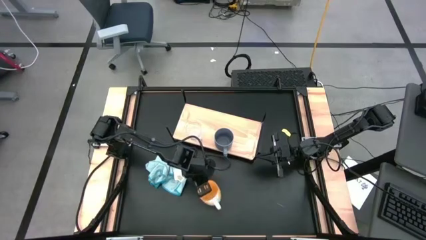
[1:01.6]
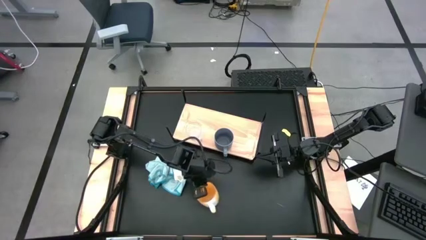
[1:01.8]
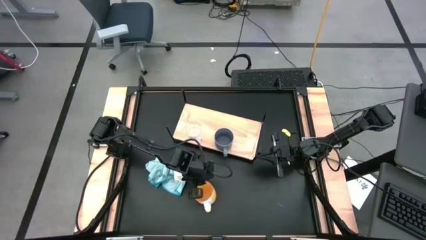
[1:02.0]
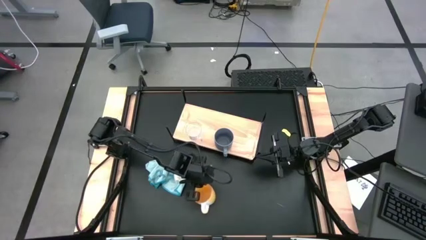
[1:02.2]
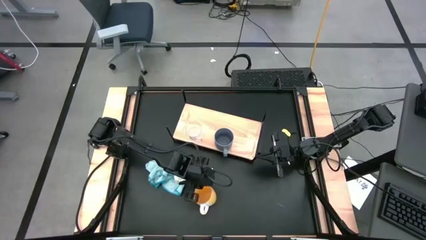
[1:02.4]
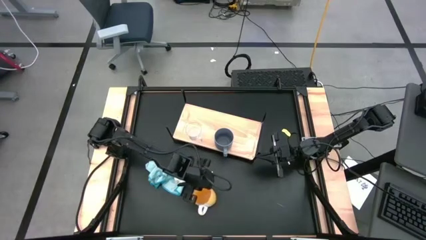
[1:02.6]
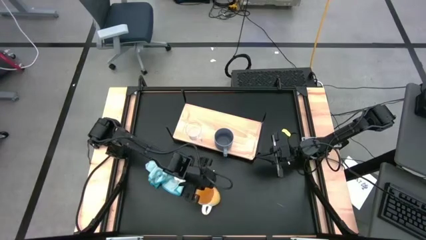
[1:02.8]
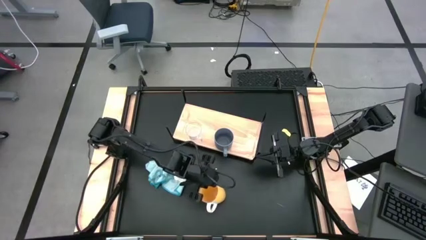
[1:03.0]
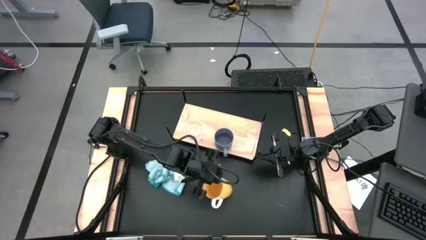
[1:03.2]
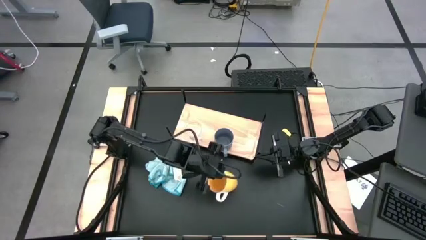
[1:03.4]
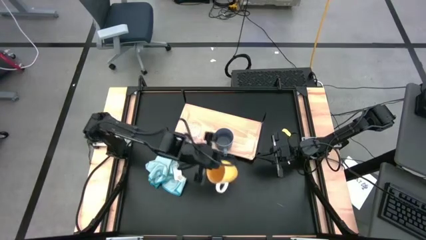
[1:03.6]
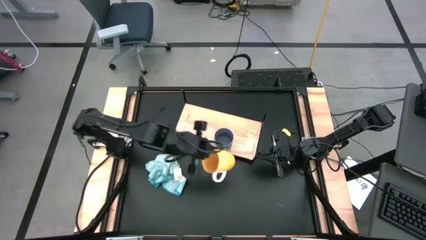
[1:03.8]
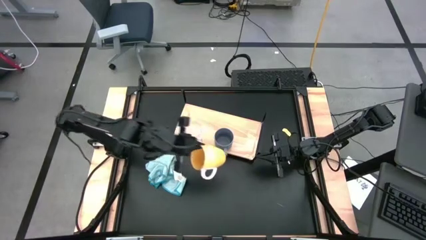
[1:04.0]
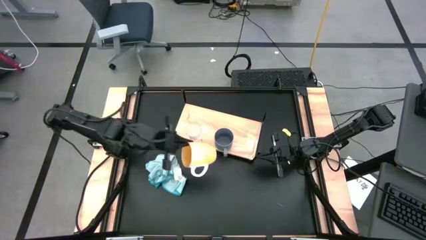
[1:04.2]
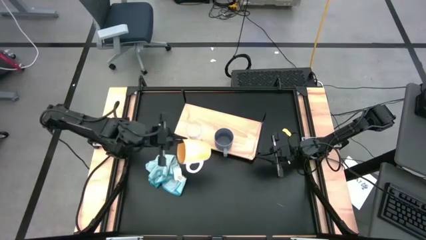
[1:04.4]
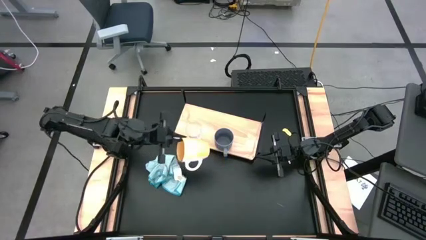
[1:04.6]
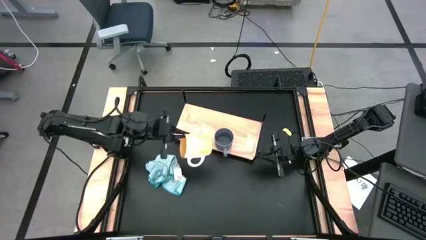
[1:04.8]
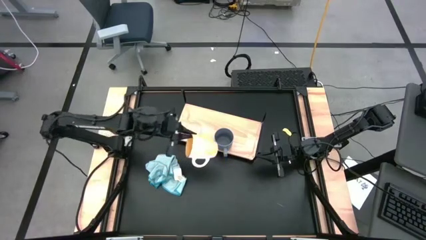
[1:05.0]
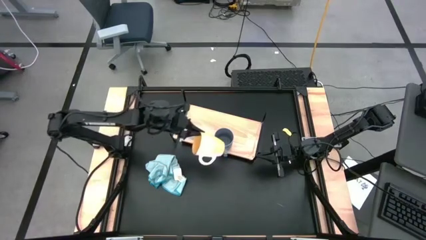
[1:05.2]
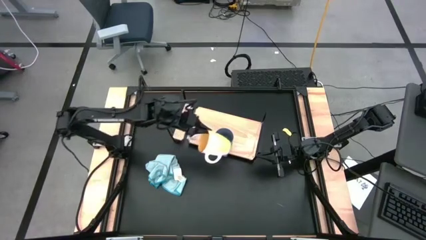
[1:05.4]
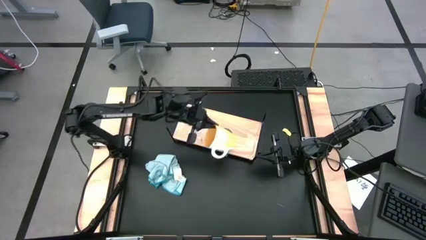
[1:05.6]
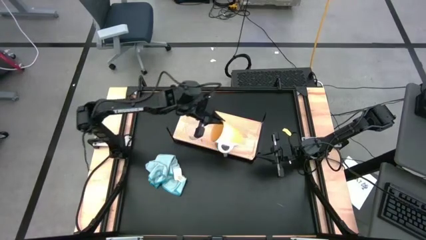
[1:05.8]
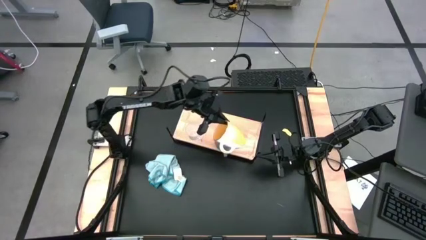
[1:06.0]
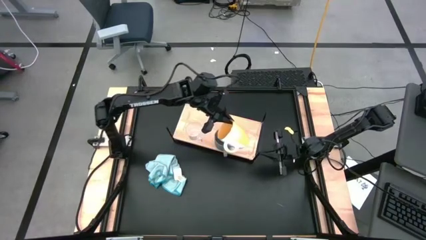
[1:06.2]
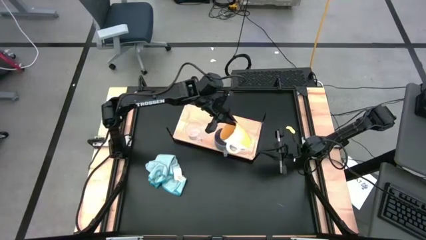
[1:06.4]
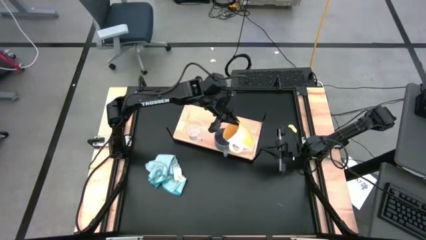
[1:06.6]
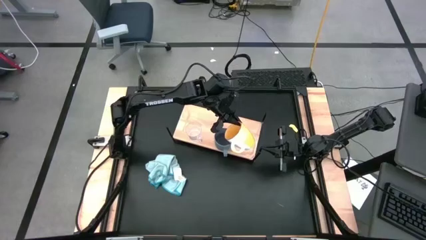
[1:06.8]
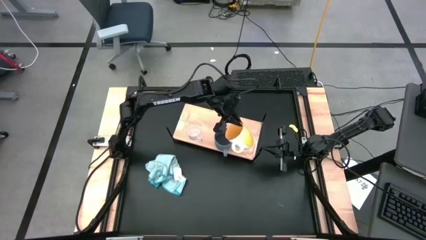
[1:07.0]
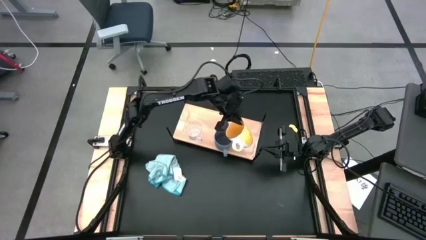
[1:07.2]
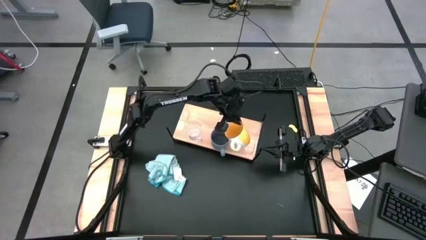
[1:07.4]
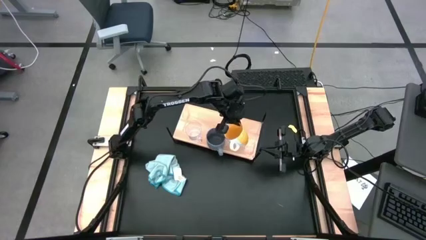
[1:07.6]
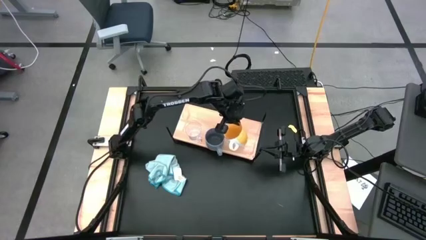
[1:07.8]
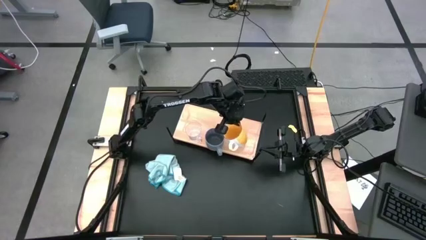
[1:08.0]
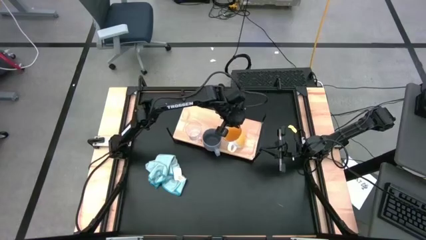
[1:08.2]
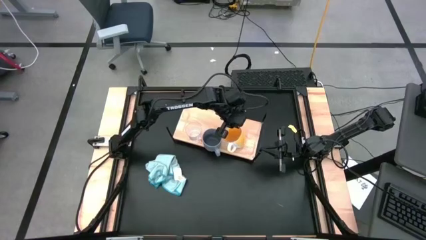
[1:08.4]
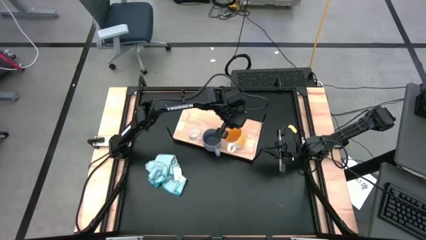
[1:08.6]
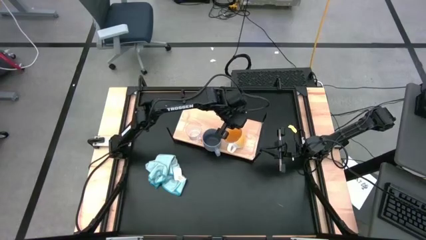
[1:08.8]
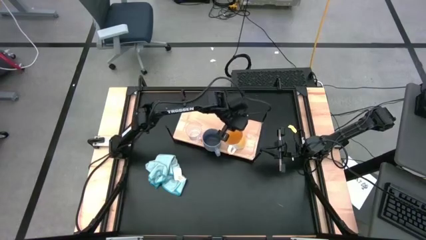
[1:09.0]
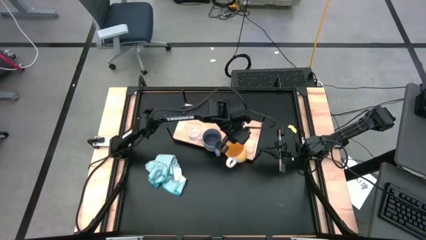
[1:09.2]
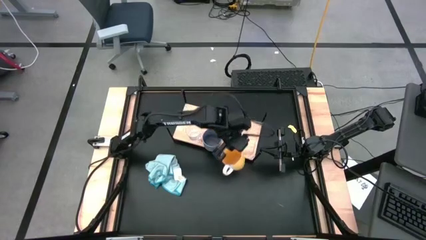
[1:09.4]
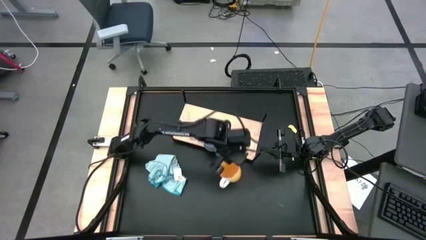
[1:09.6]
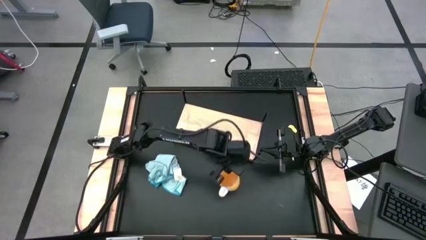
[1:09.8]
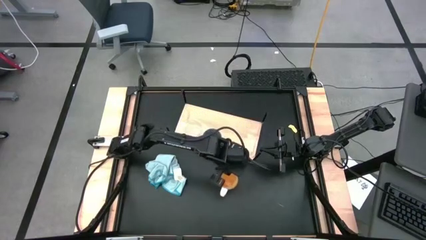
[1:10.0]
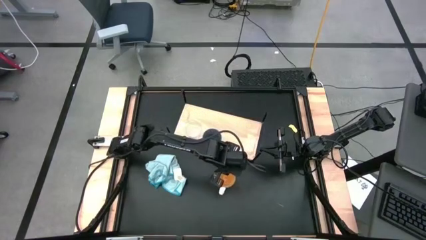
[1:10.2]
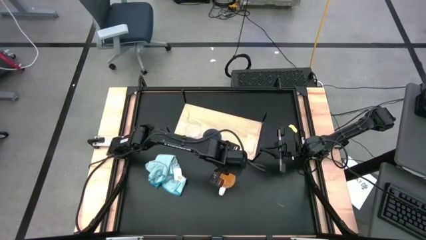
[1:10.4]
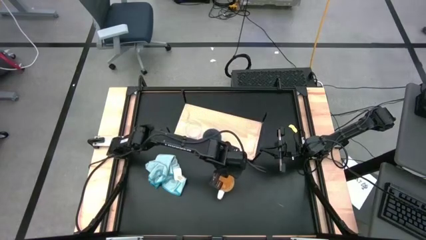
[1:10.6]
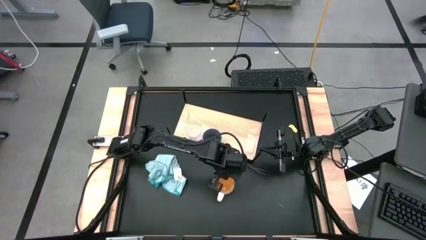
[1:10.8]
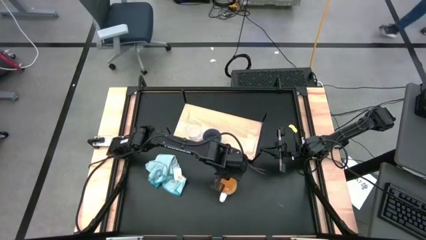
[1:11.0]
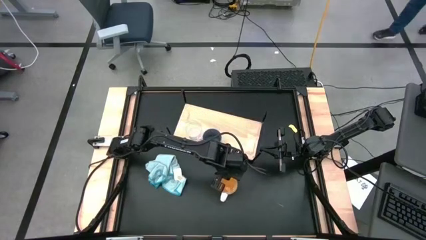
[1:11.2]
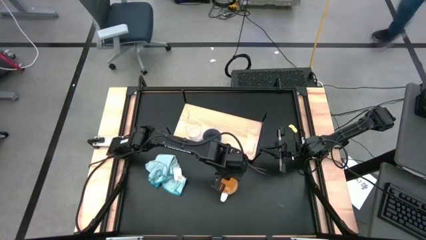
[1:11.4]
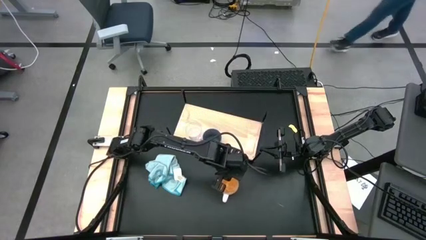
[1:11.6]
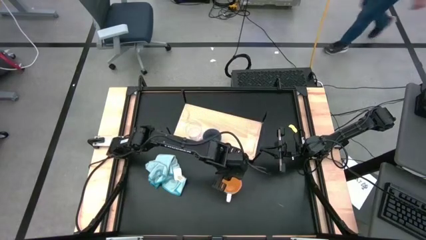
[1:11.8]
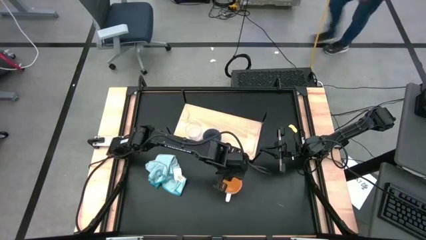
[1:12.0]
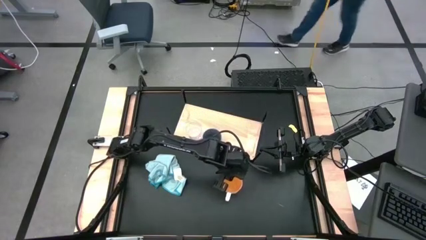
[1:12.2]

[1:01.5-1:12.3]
Task: Stack small to large cups/mugs on shelf
Put the yellow mug on the shelf

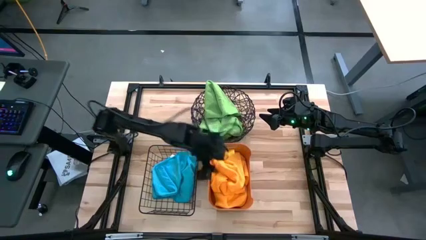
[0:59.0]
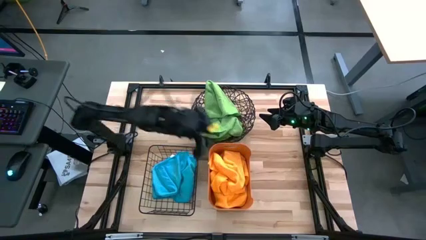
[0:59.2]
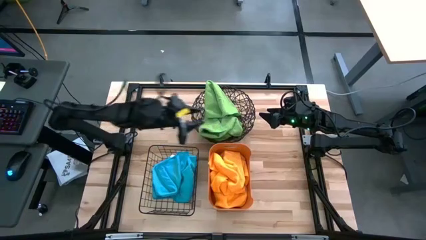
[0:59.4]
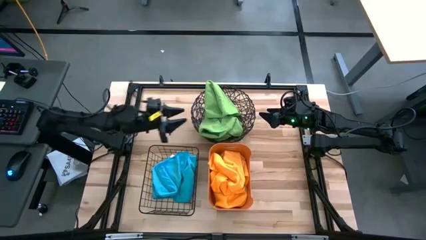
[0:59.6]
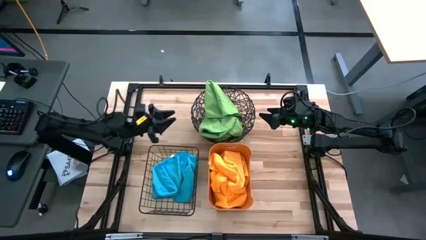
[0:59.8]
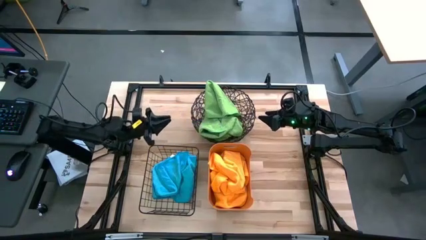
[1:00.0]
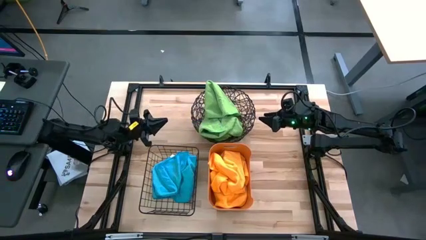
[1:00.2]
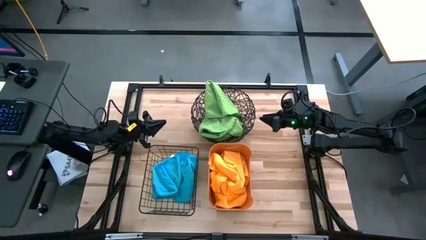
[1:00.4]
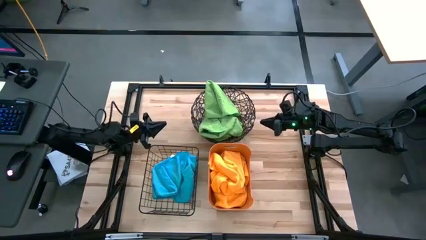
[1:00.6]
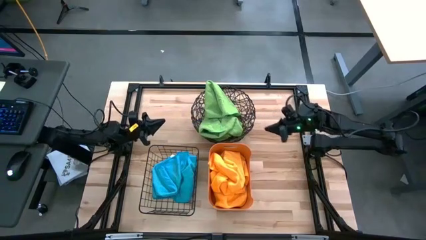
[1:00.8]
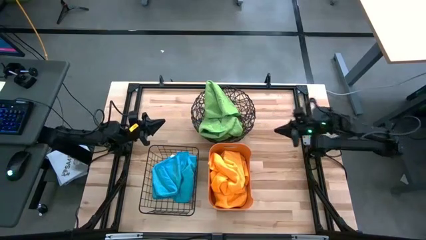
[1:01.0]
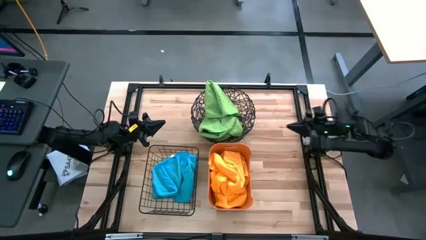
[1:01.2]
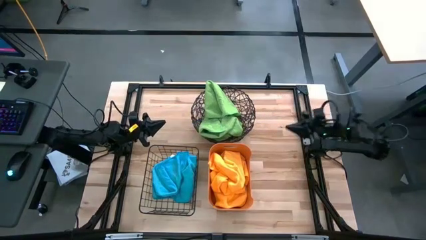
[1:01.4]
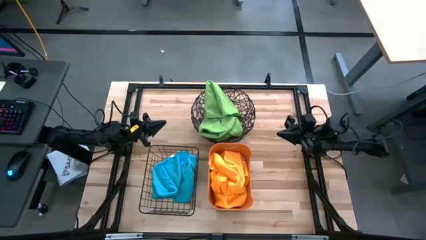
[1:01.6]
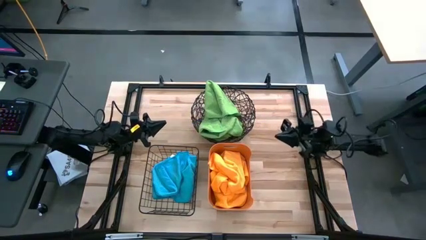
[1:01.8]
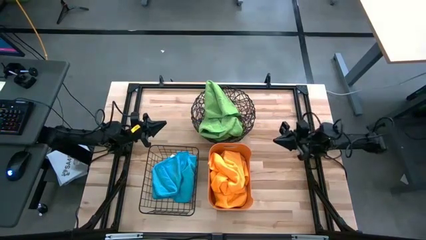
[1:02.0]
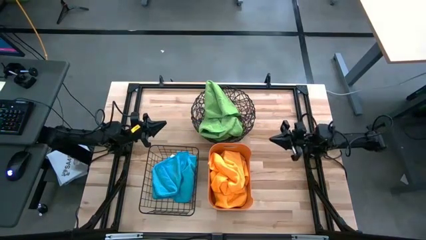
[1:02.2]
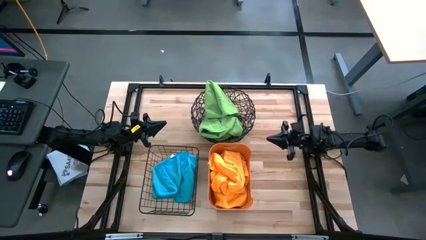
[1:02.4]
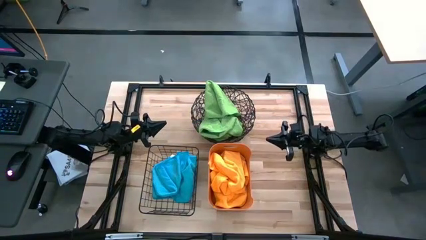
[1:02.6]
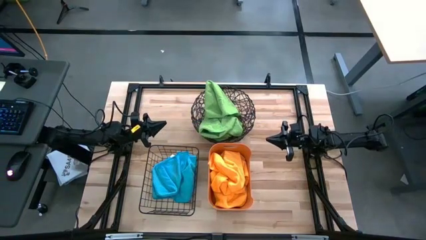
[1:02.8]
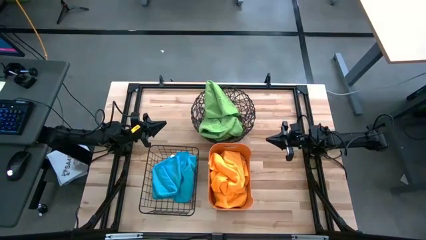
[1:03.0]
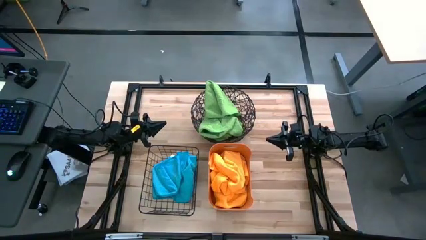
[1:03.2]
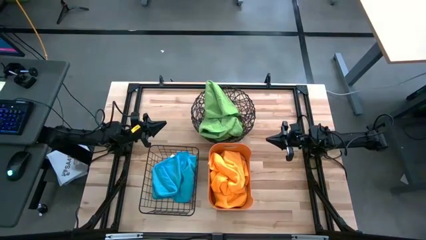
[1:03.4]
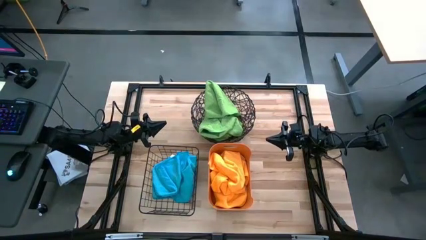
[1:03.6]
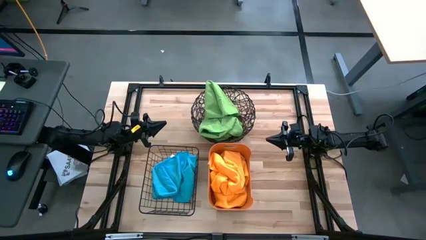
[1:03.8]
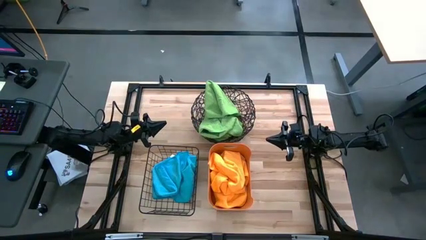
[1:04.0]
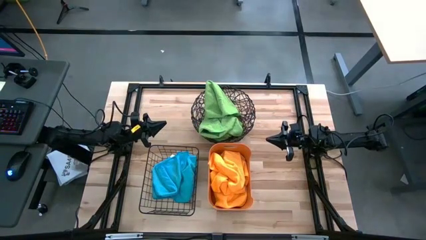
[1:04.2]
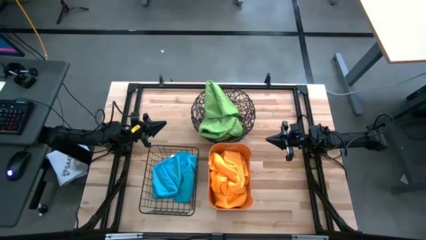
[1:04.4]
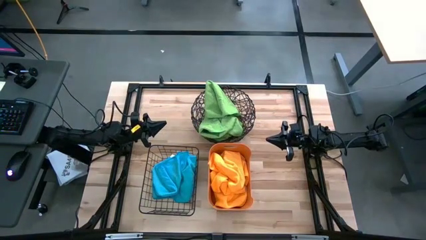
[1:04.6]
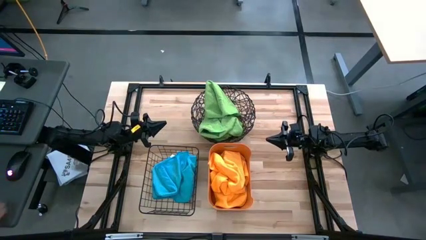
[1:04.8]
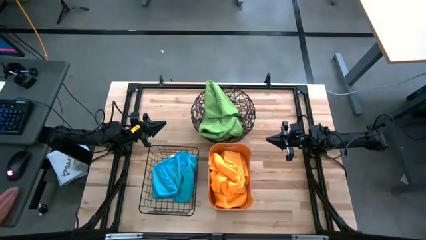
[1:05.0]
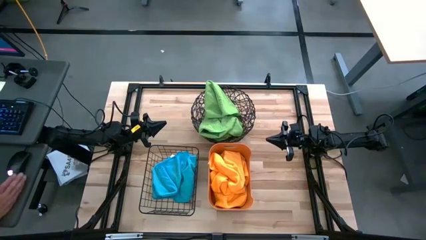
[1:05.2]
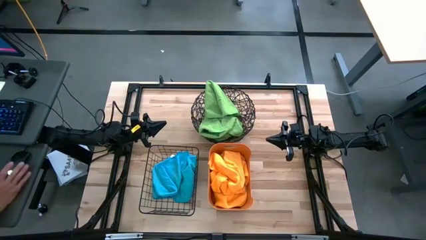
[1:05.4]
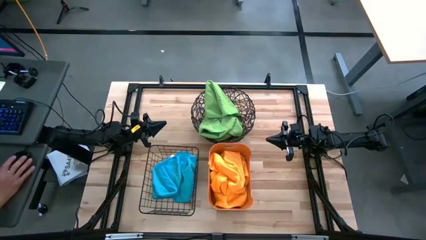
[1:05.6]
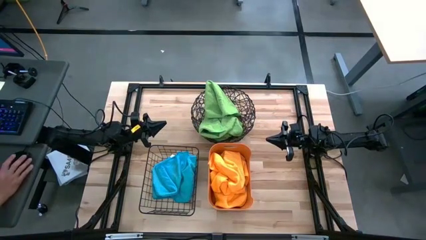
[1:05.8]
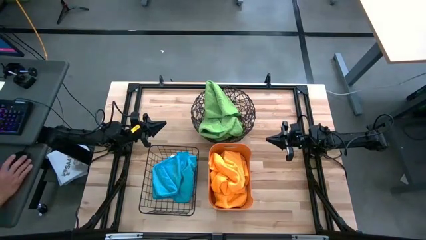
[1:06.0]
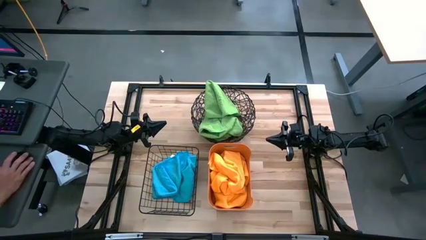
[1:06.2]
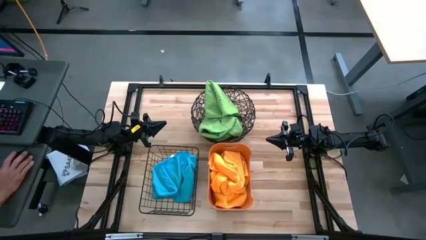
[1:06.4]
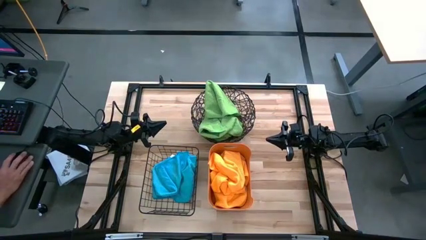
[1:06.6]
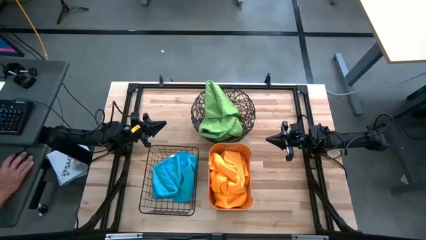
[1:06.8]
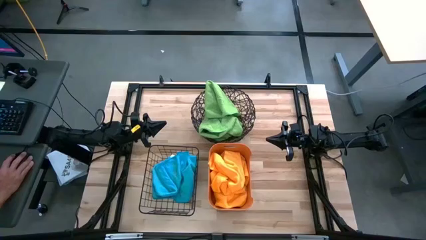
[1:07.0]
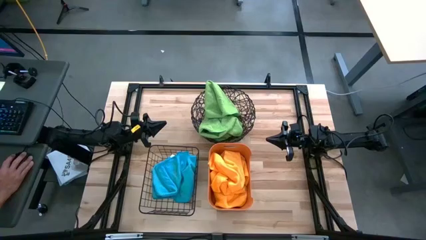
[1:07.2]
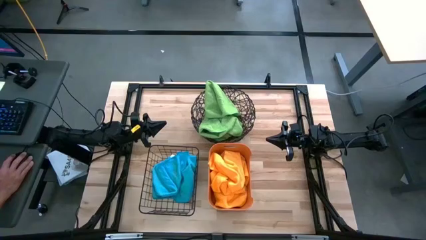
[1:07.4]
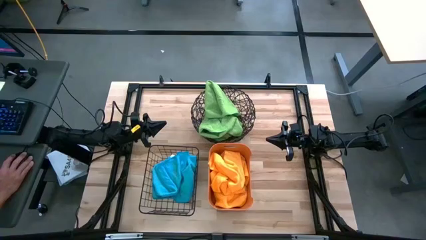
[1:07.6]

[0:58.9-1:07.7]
Task: Sort microfiber towel by color & place in baskets
Return to Home Position
